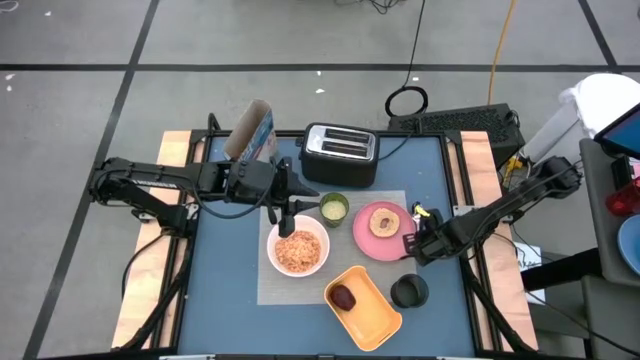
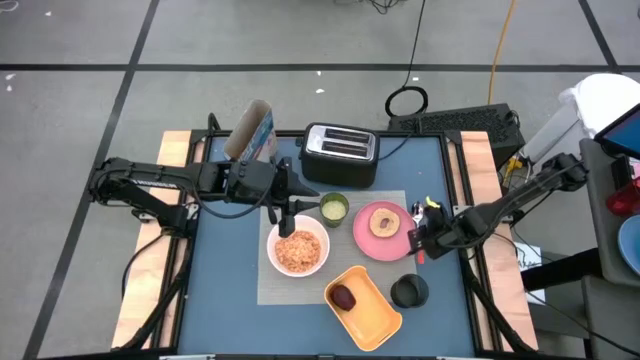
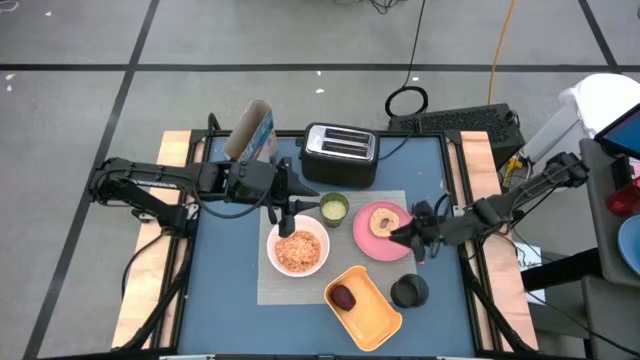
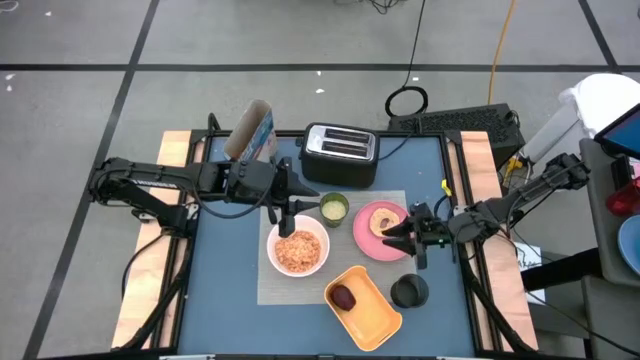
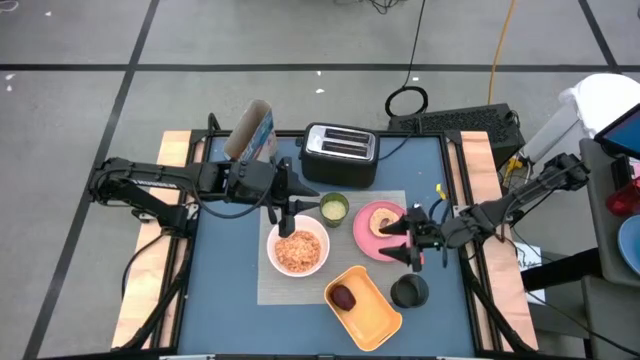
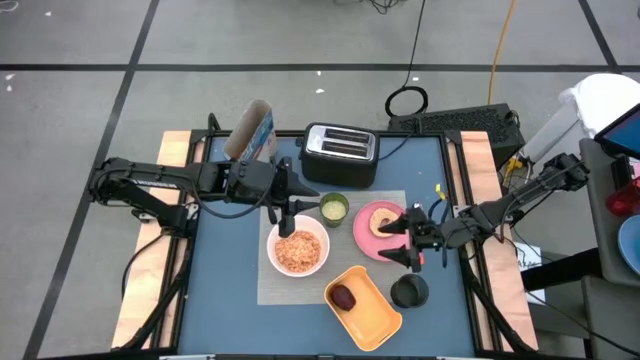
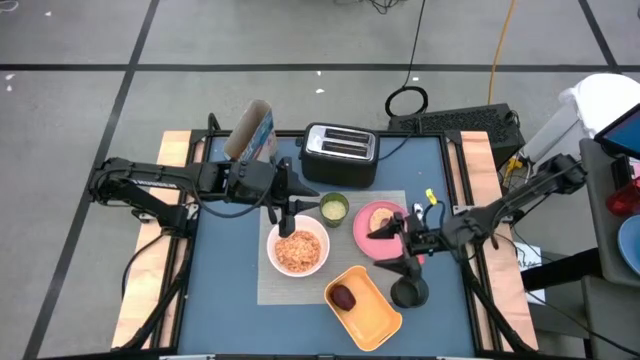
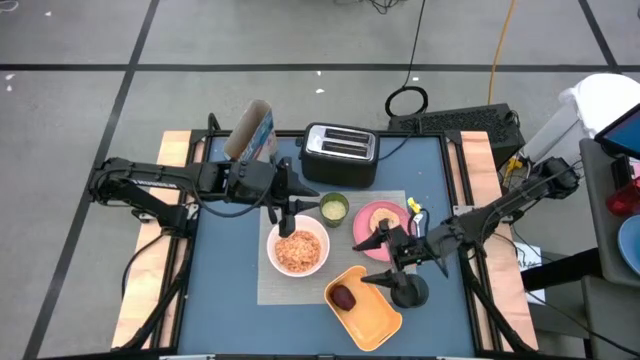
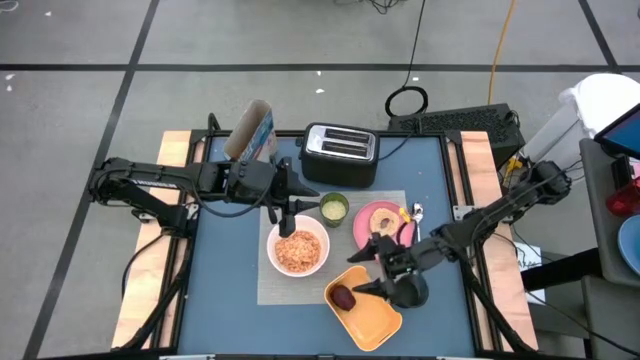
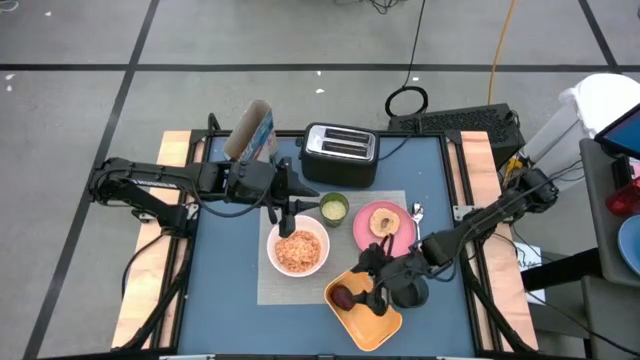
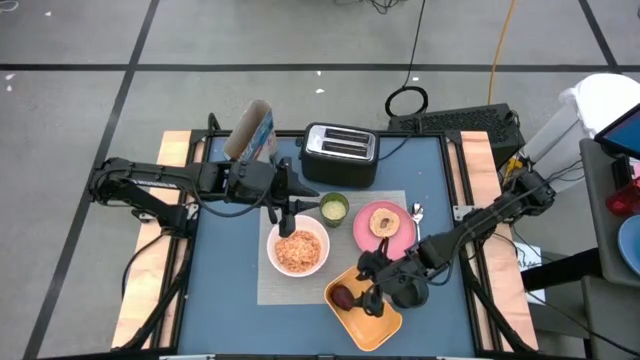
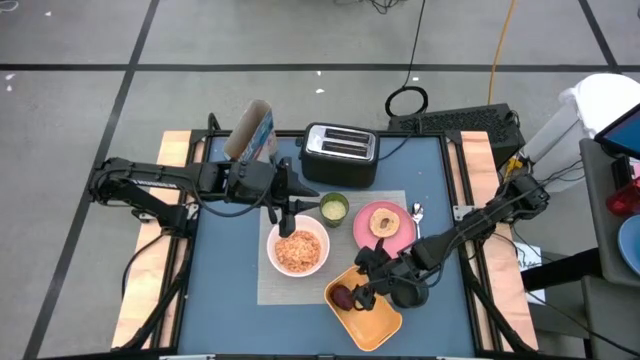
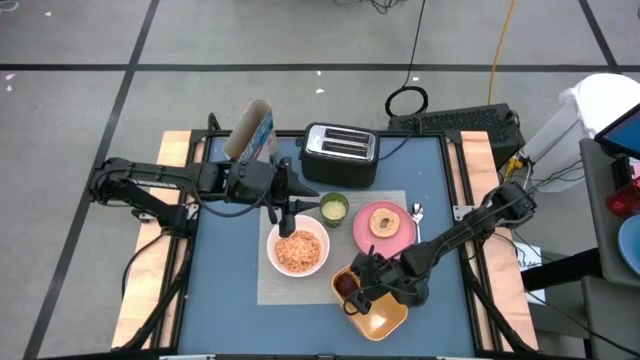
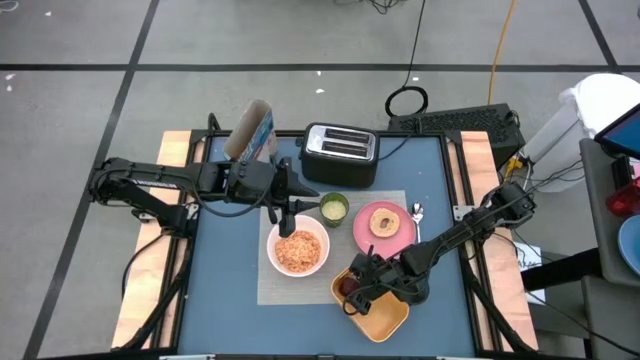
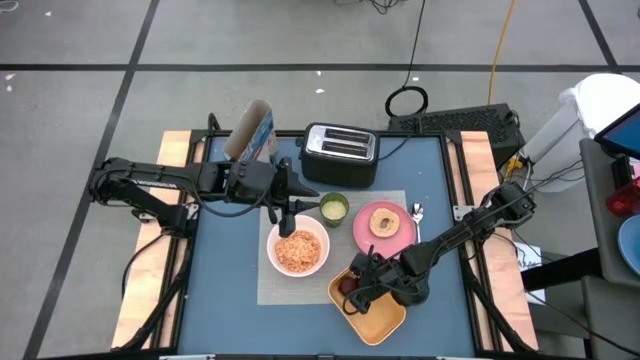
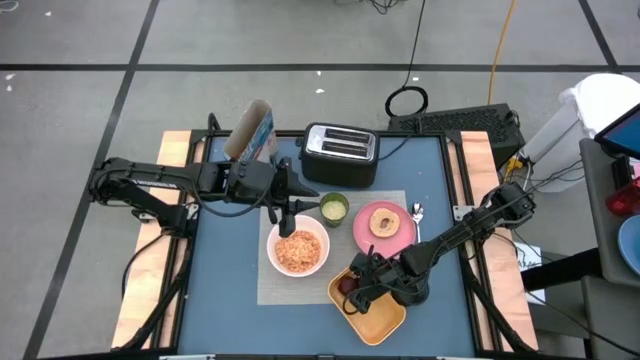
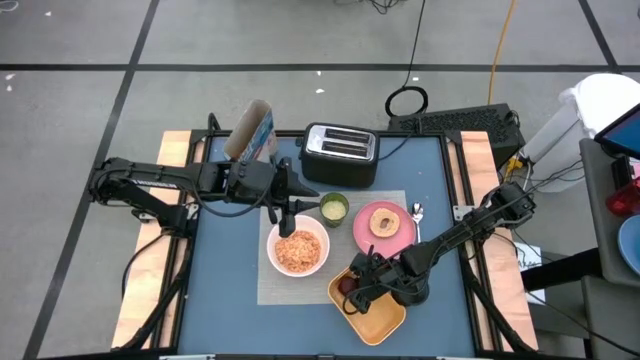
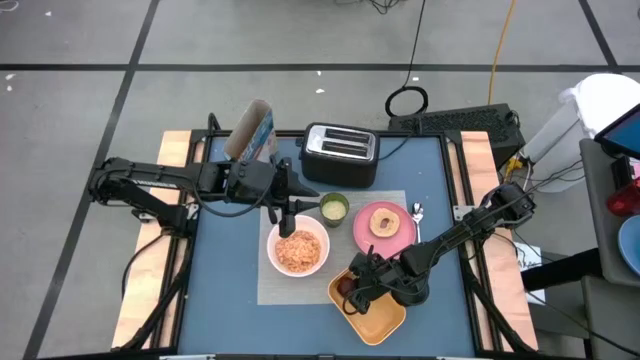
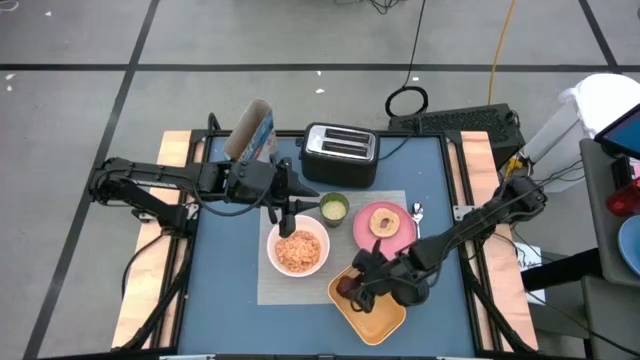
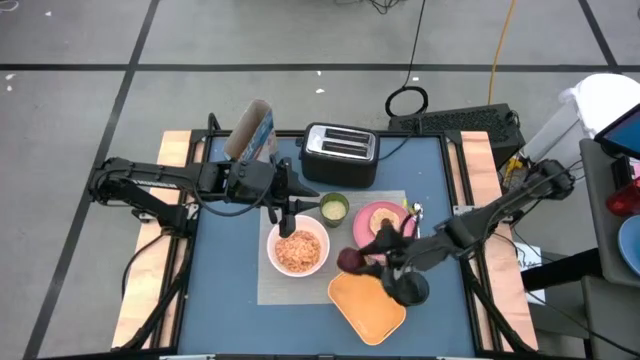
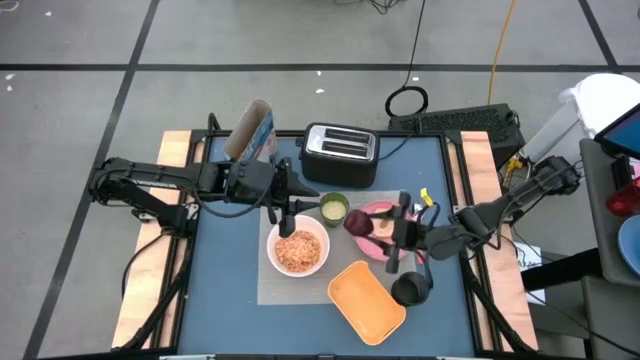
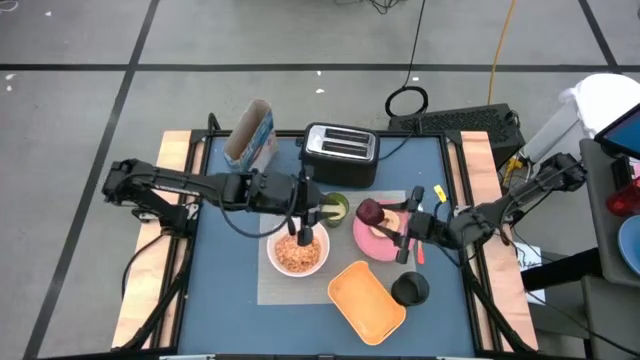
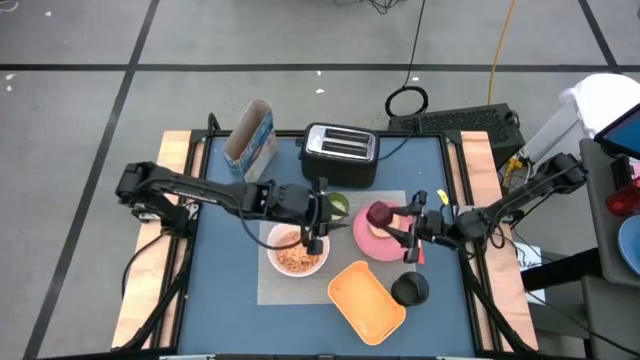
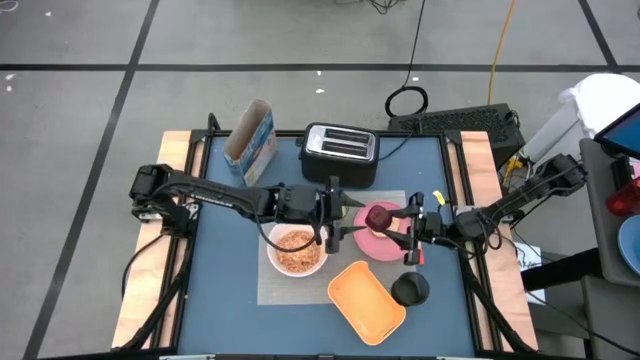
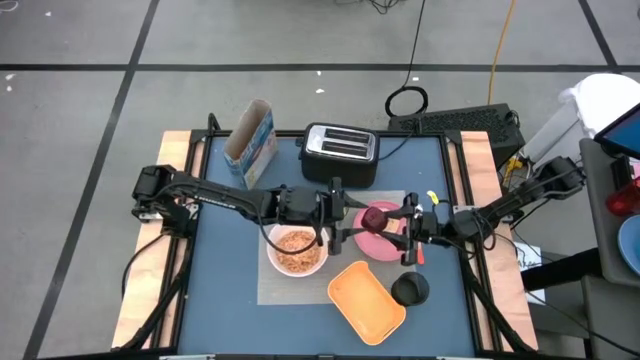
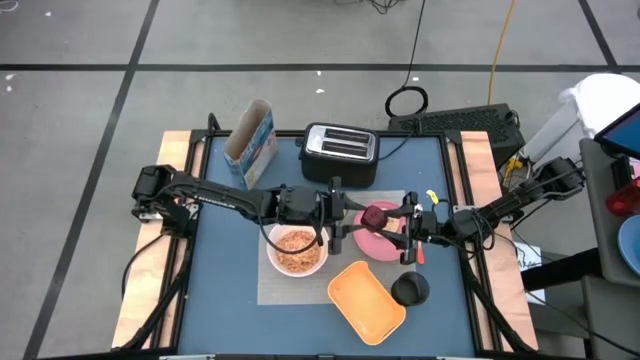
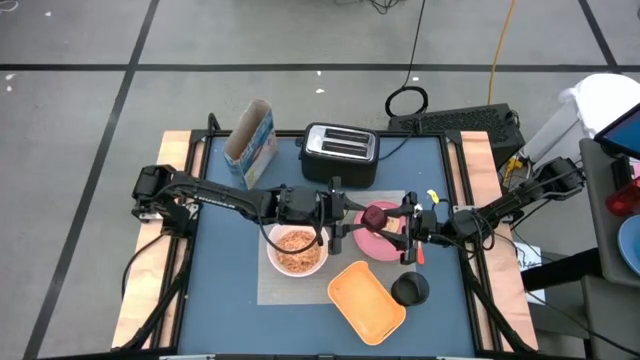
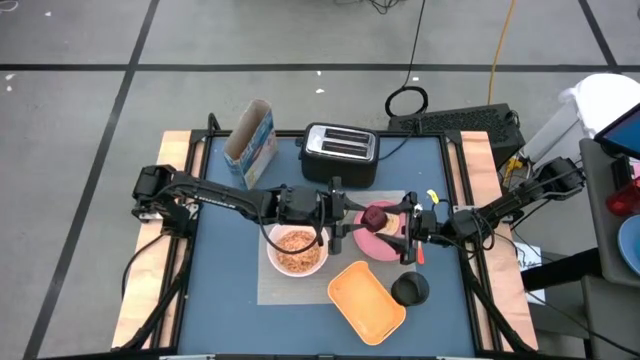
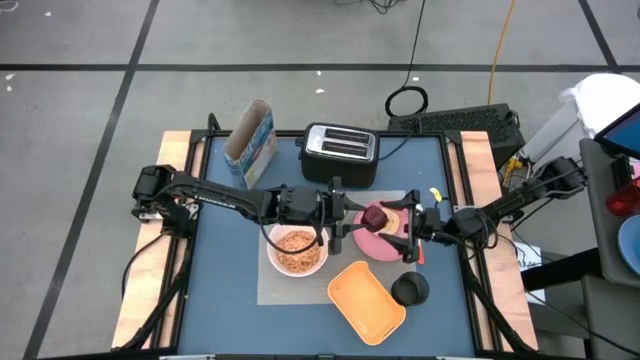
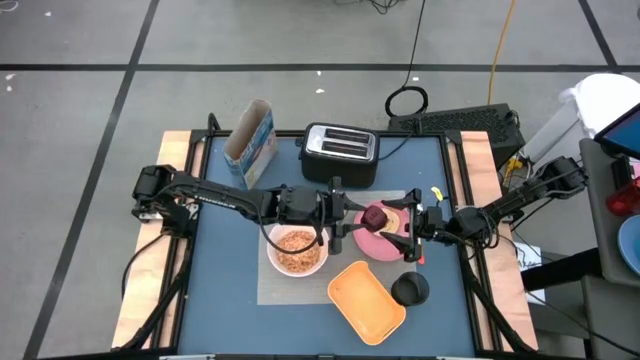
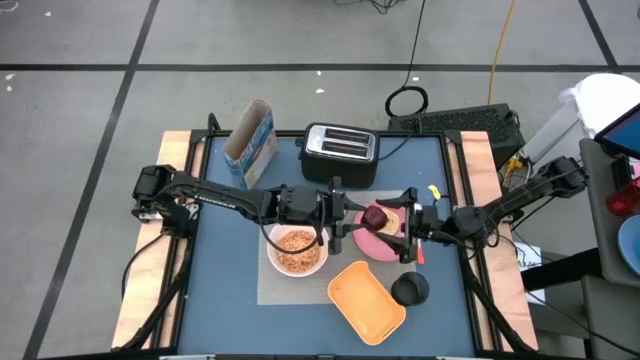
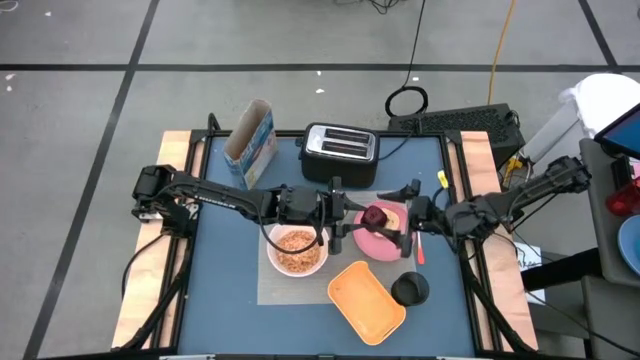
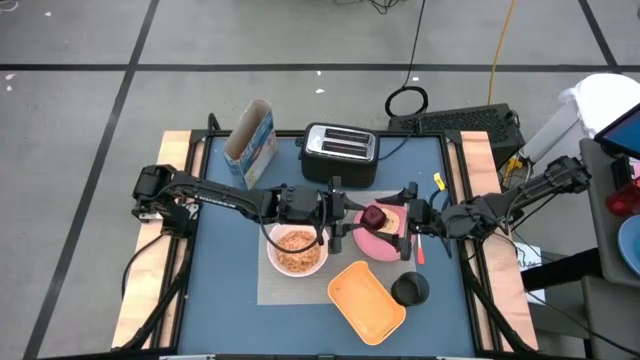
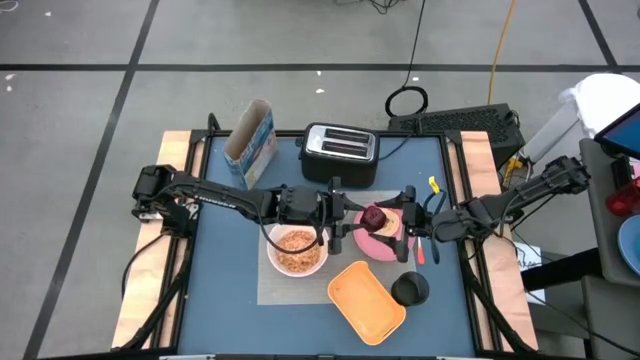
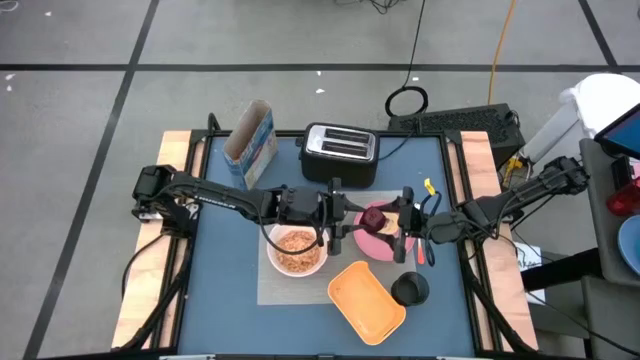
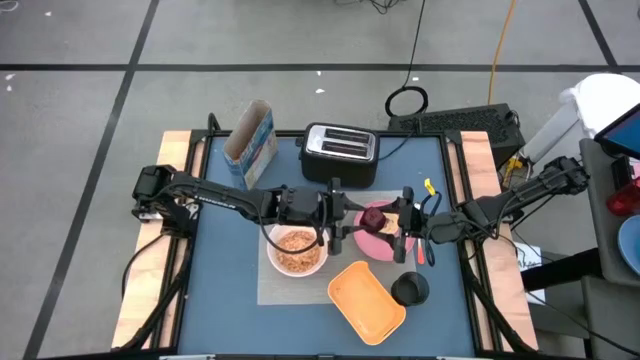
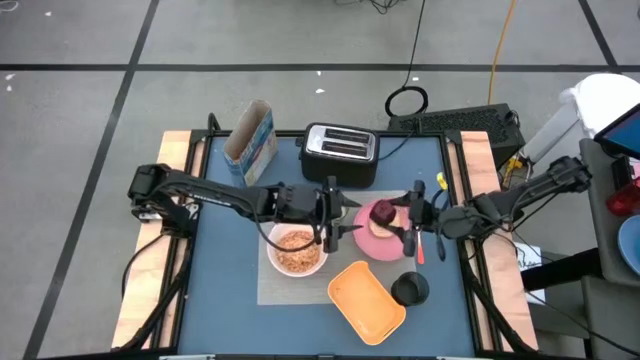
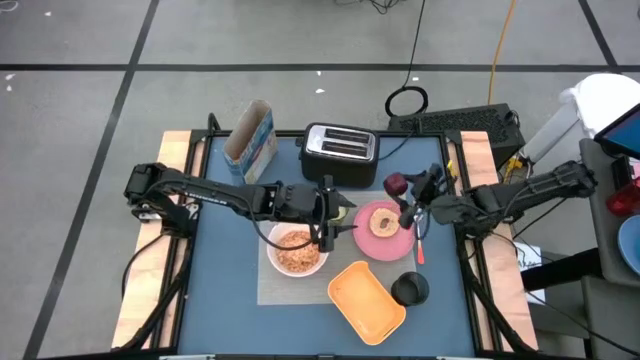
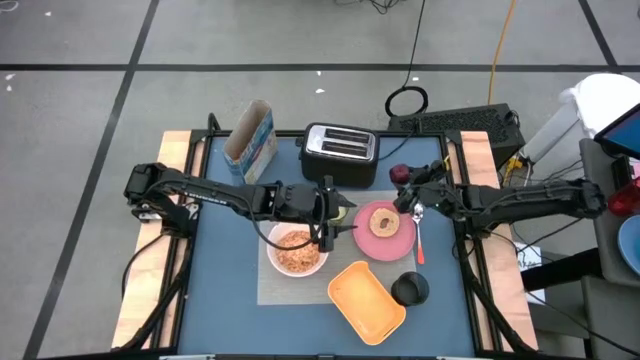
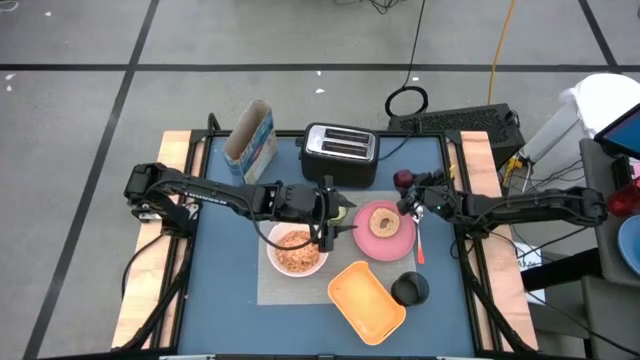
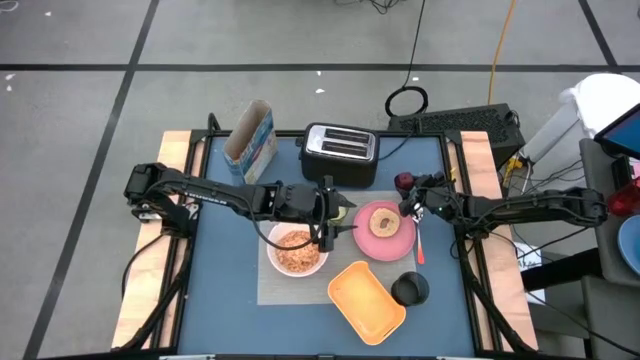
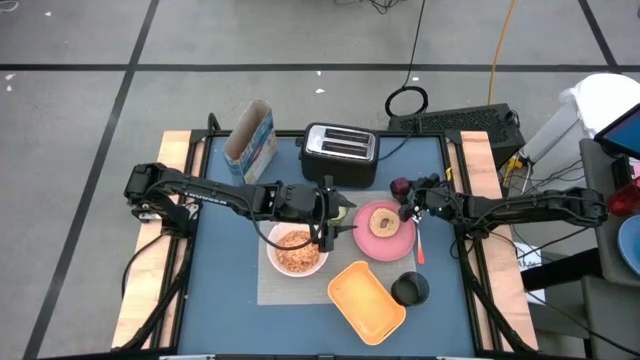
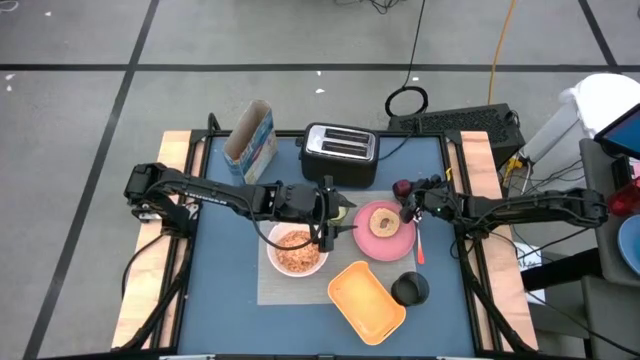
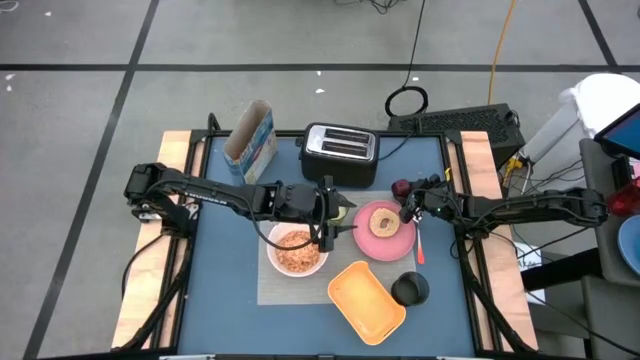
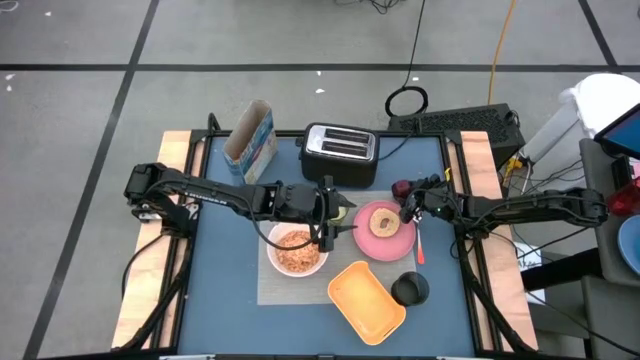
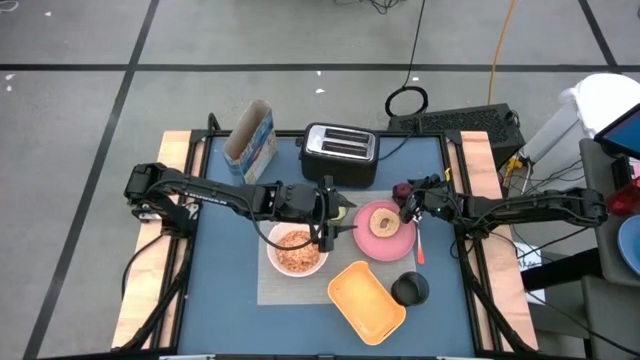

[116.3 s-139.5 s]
Task: Arrange a breakfast setting
Put the apple on the gray table mat to the top right of the pink plate
